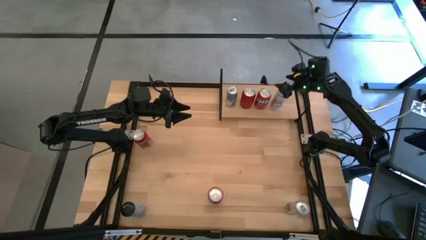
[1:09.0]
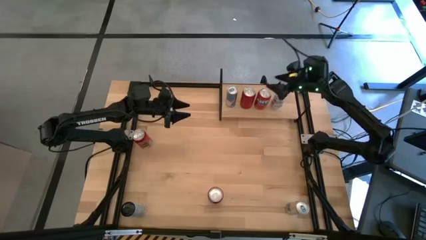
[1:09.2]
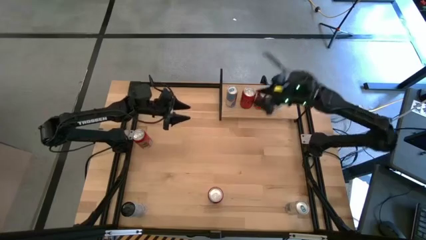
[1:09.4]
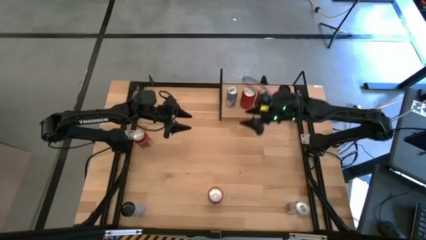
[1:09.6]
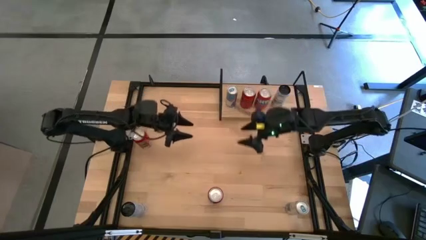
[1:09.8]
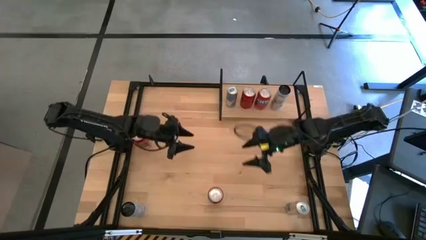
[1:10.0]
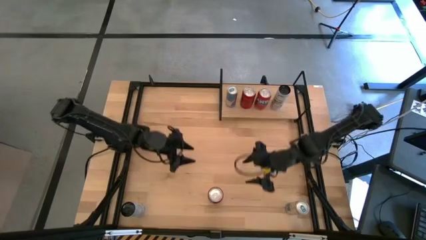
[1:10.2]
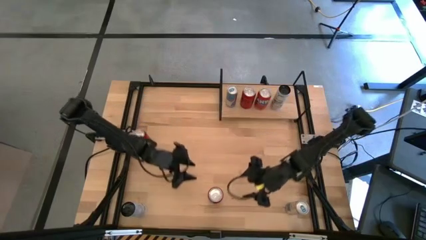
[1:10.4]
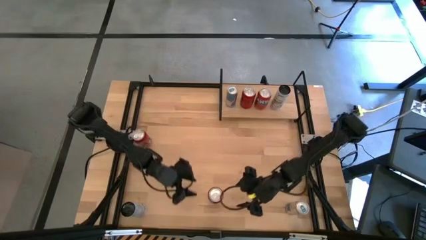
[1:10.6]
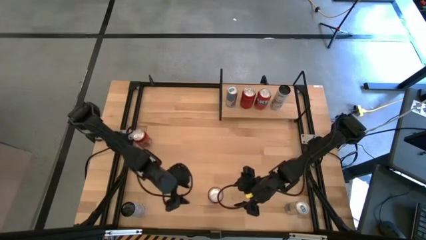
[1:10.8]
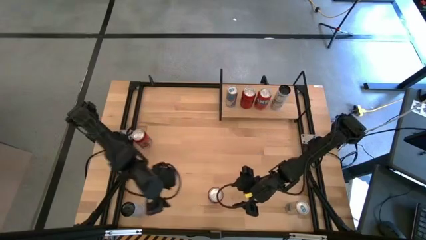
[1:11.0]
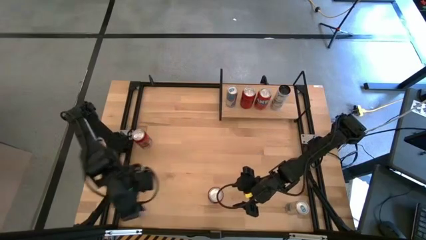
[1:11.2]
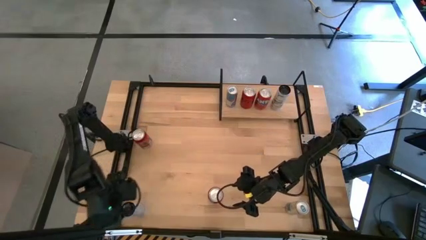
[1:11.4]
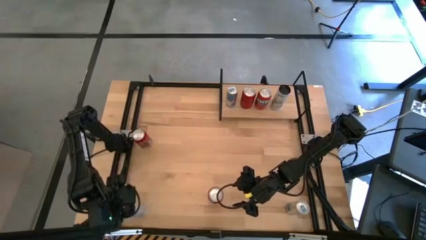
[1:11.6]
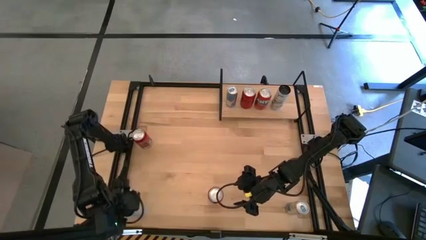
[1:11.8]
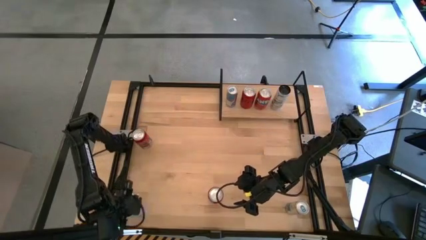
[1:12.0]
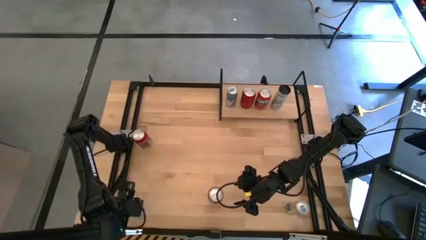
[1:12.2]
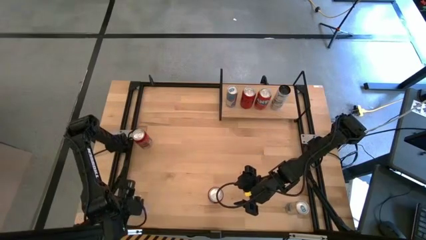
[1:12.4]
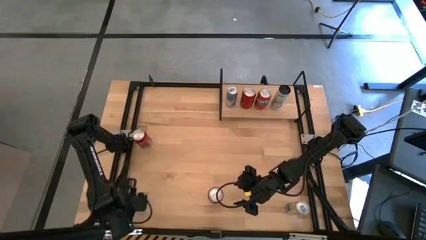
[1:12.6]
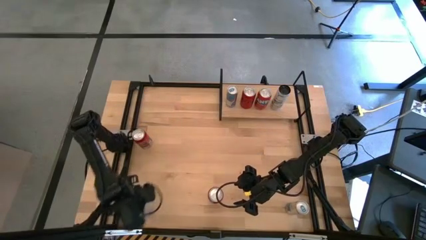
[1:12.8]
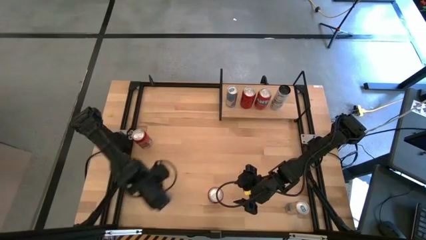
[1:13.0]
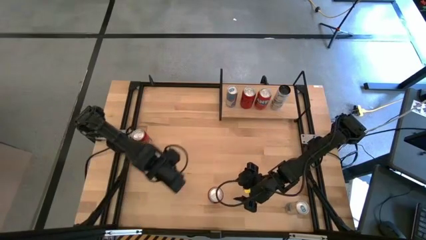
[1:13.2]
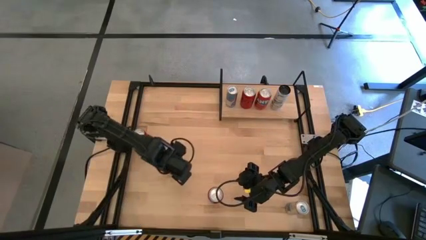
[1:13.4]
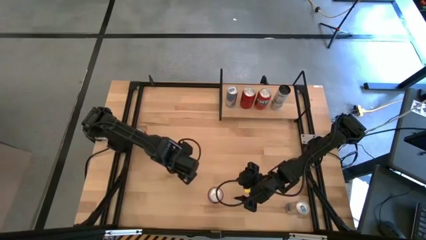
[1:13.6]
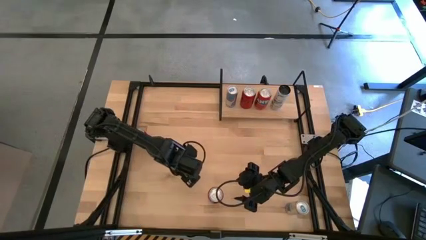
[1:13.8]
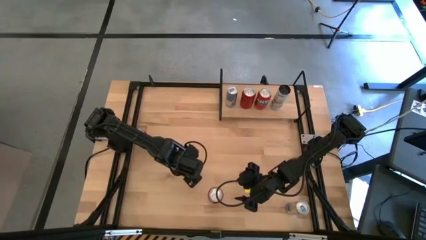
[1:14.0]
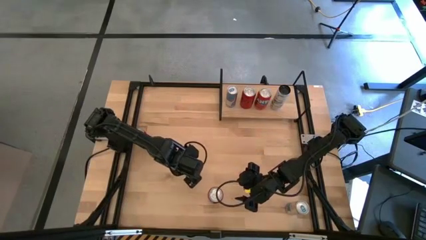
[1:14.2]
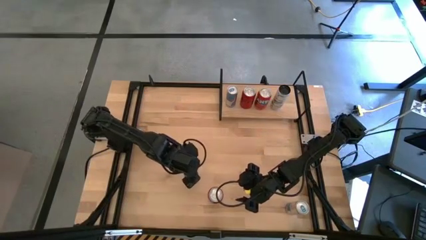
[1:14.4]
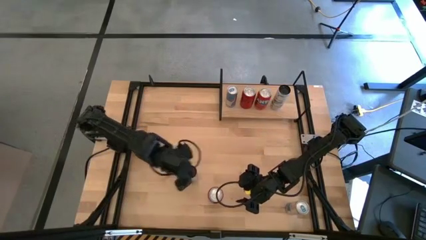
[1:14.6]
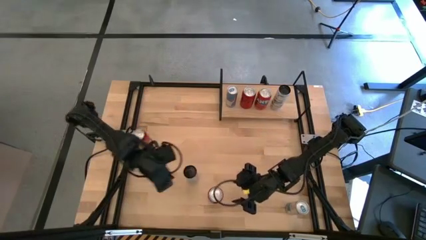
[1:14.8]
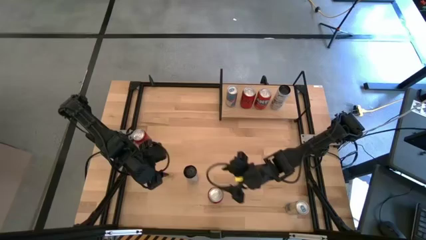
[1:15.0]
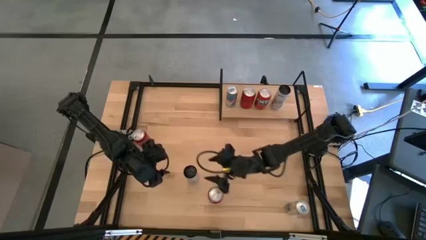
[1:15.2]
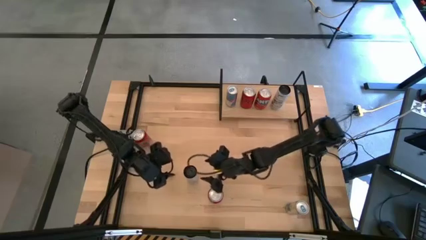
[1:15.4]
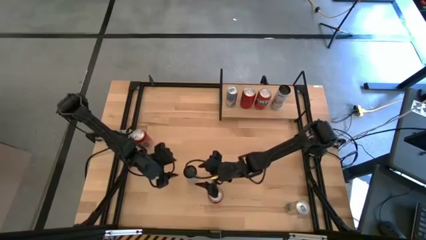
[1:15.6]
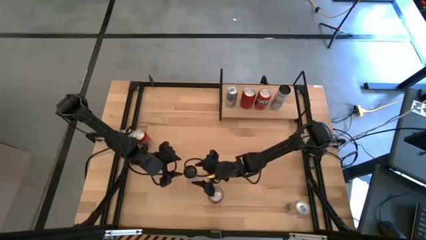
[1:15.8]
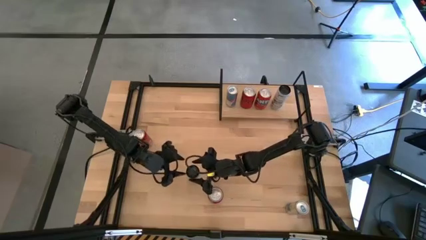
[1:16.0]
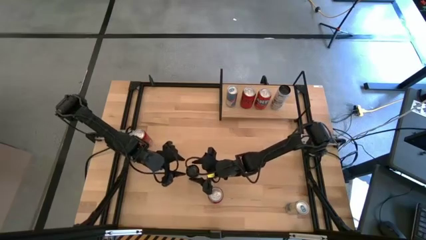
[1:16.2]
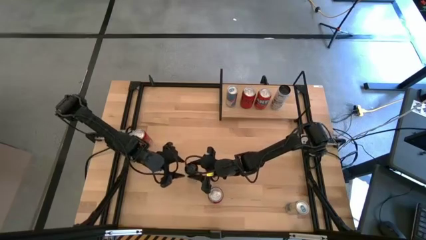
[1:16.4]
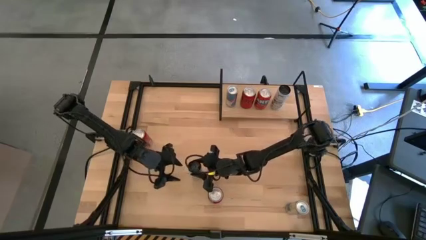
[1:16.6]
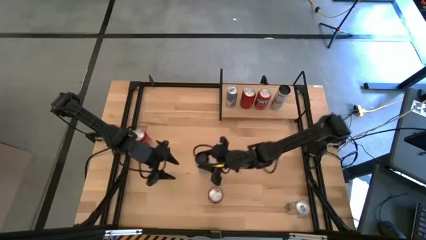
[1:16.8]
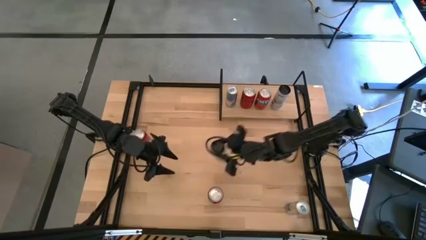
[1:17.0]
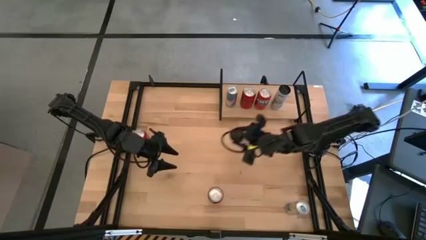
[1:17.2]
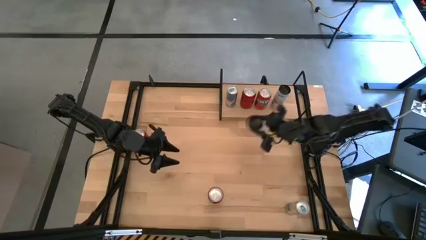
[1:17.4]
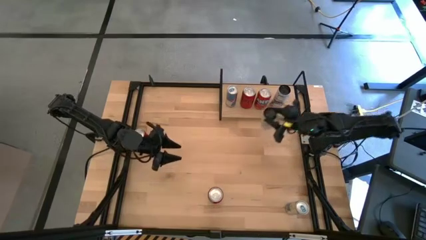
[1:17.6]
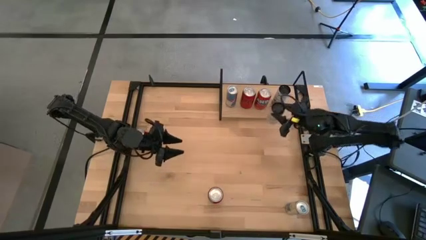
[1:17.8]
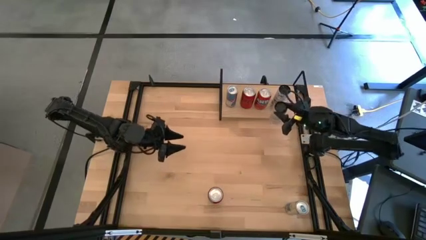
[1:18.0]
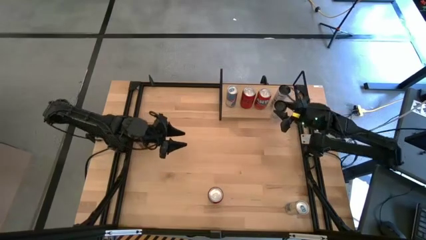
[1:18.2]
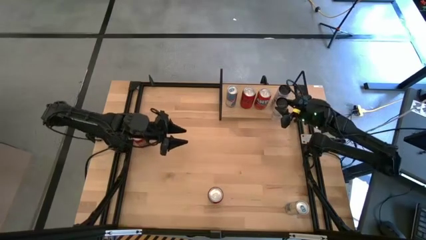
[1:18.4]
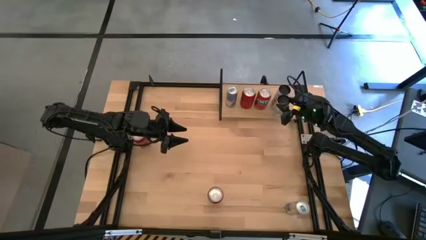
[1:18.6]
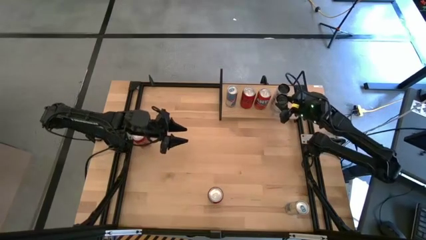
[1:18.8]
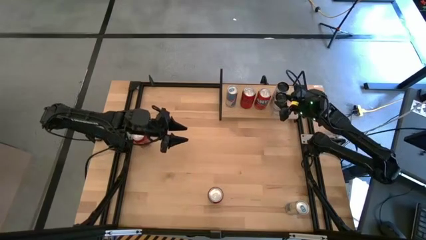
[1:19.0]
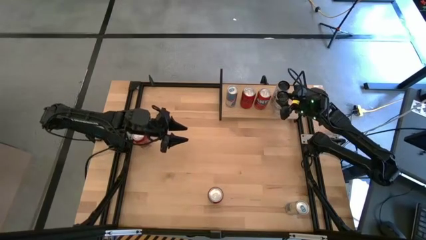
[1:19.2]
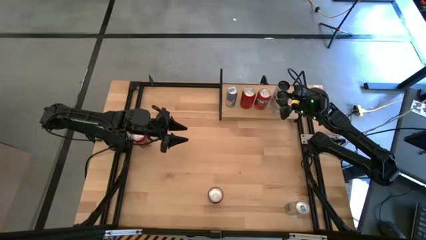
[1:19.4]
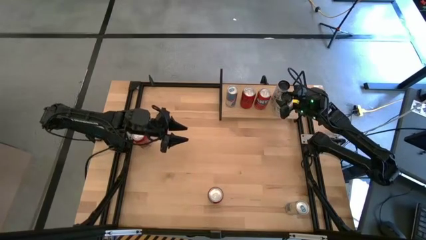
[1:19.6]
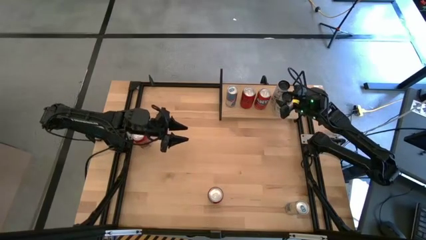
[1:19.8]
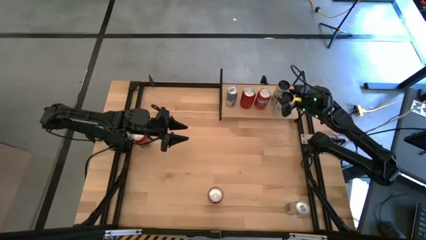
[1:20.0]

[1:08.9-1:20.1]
Task: Place canned beverage on shelf
Put the white-blue soda can on the shelf aligned with the other white-blue soda can

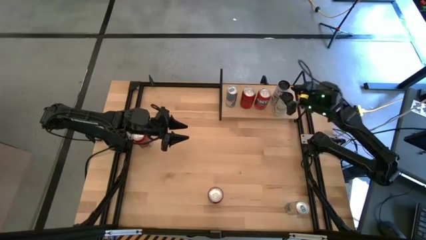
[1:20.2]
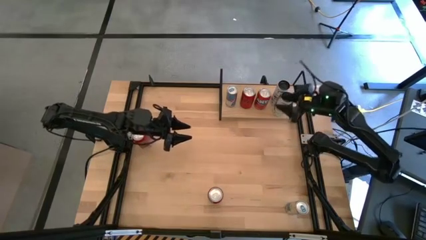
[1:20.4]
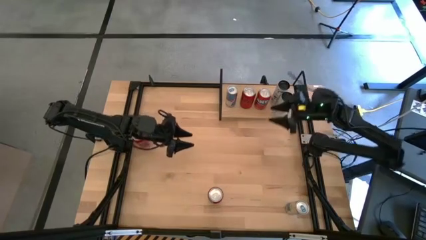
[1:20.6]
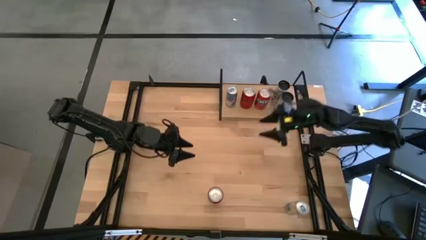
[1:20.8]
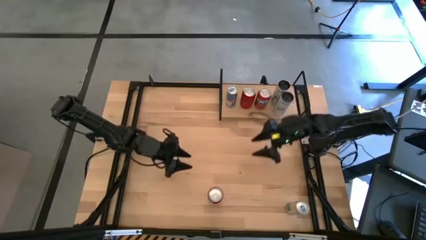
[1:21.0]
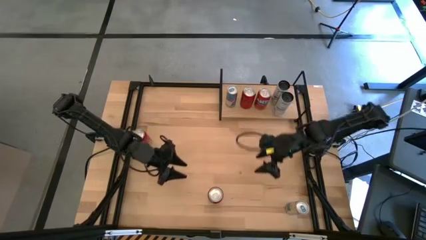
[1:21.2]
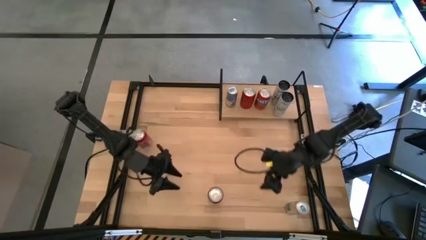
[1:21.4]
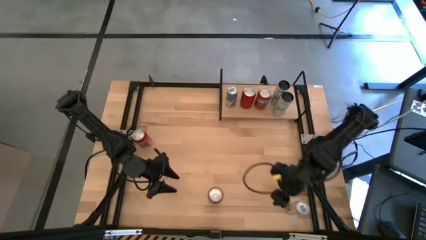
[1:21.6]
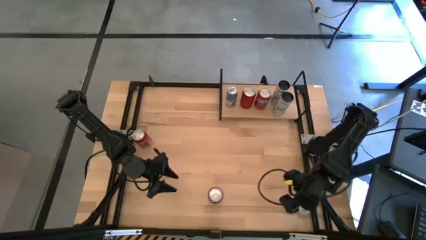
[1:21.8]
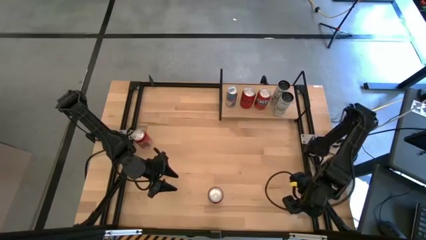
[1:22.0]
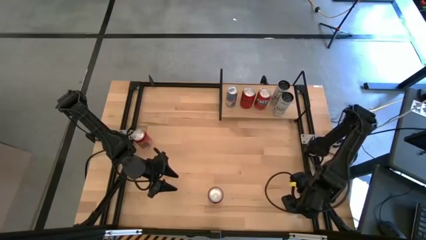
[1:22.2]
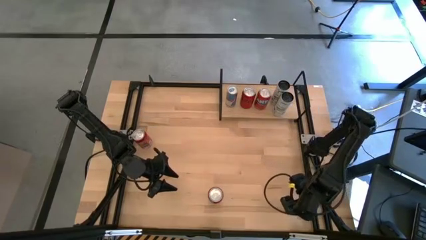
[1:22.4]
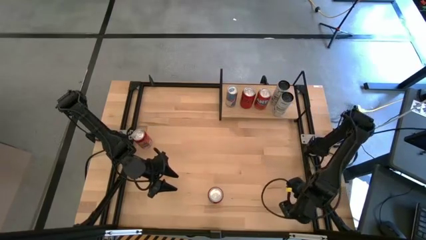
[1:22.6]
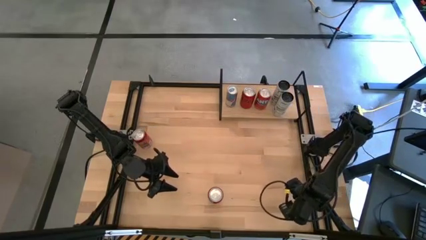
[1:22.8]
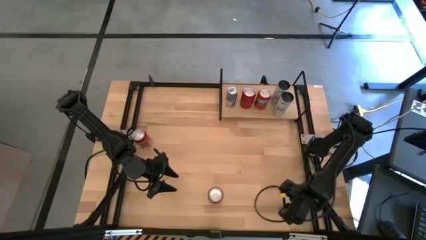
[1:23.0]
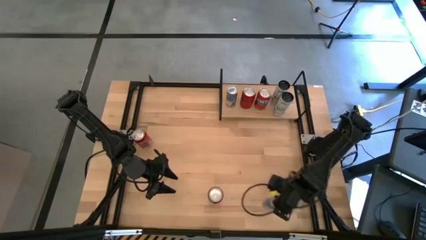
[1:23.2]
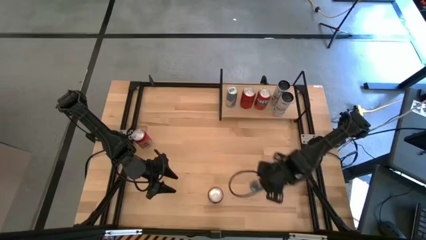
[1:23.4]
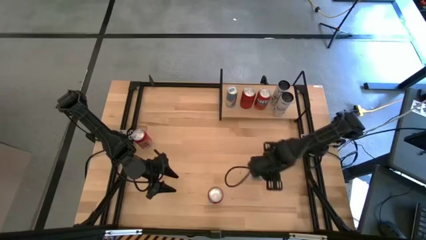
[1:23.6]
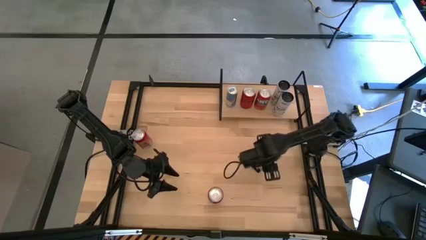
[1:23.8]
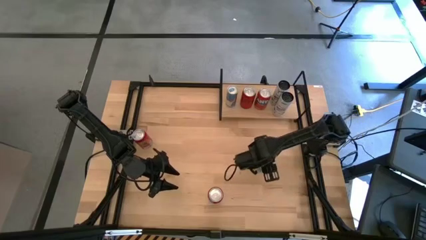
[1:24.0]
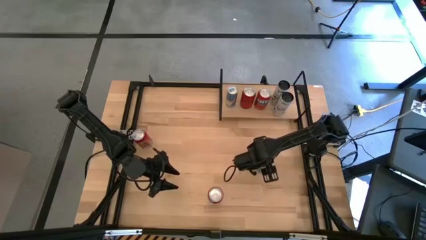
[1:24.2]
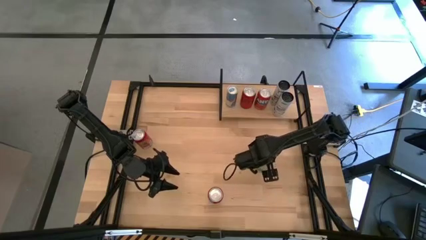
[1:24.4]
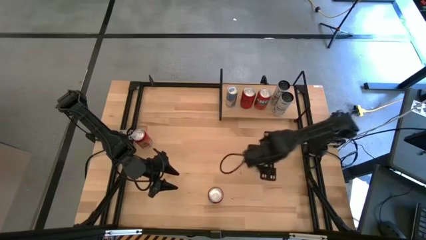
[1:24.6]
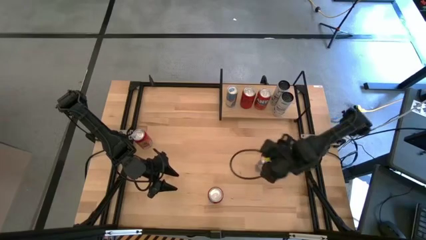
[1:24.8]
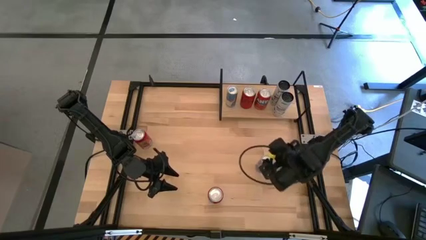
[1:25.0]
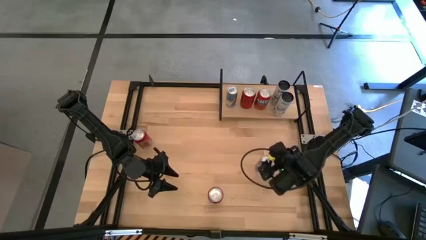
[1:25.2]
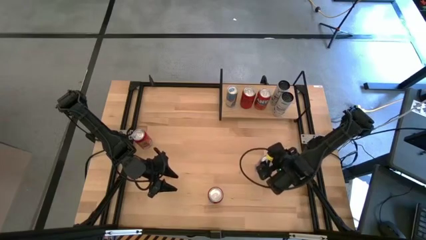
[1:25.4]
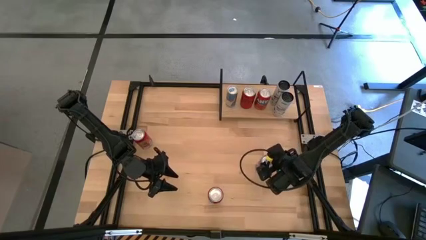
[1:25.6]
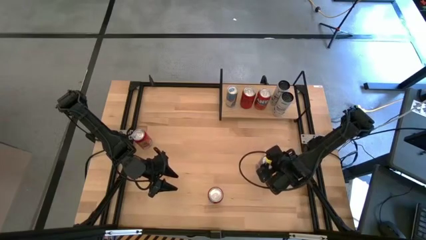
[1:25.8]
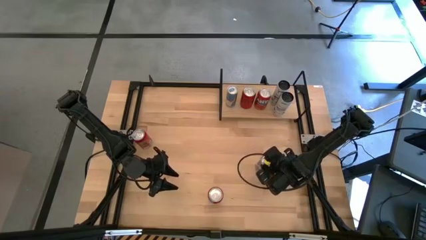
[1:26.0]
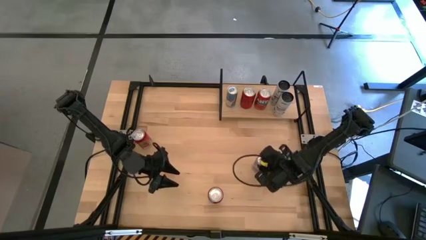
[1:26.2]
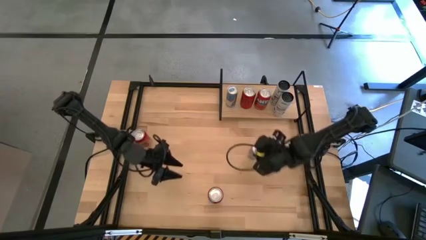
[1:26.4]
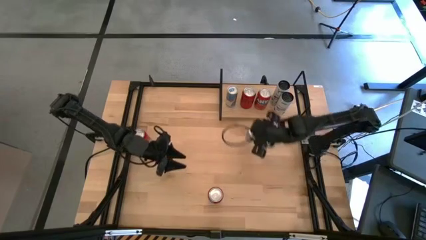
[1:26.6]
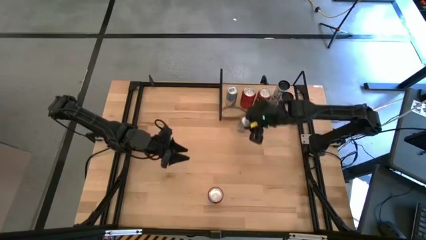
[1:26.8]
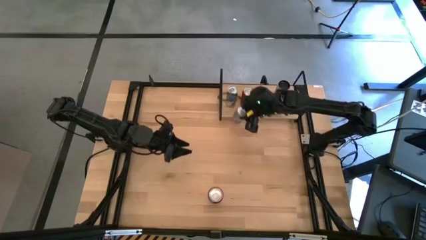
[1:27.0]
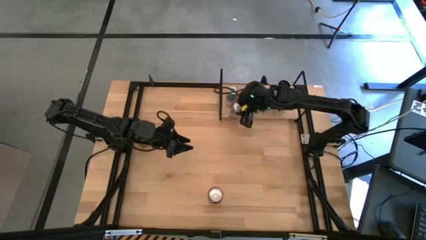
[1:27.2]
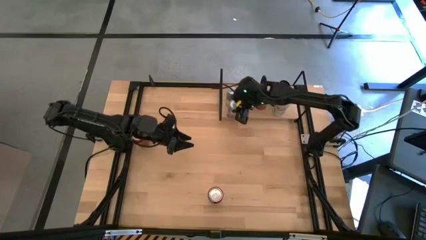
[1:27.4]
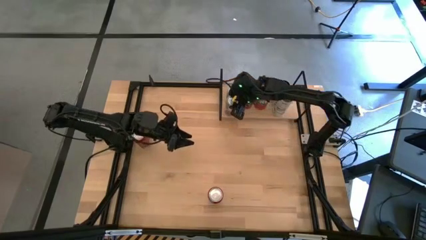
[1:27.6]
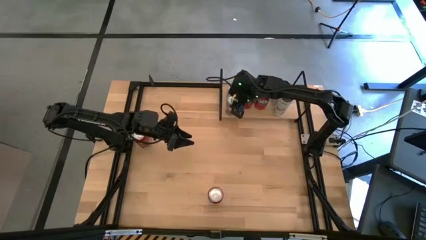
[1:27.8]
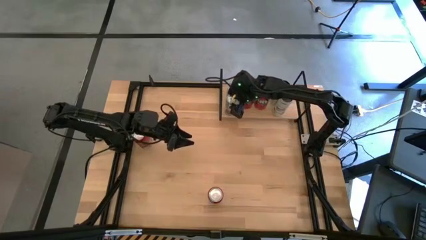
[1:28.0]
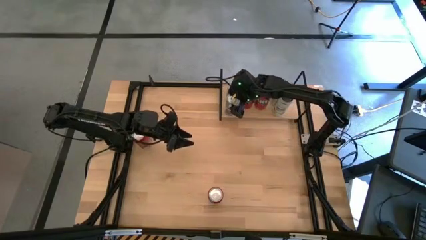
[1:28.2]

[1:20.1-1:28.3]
Put the blue soda can on the shelf aligned with the other blue soda can
